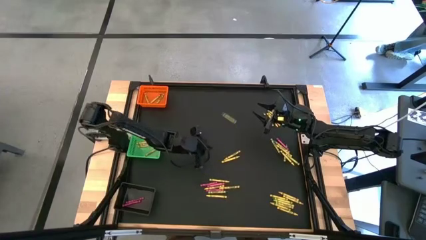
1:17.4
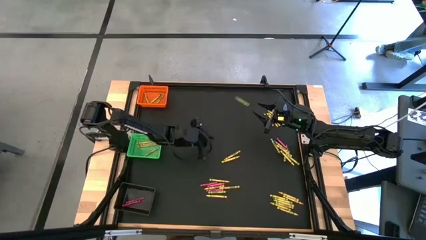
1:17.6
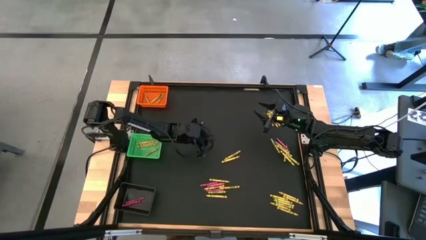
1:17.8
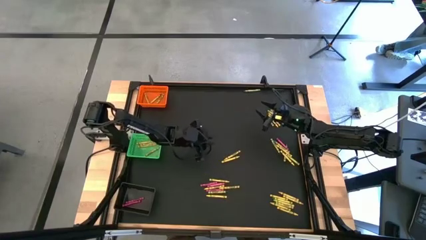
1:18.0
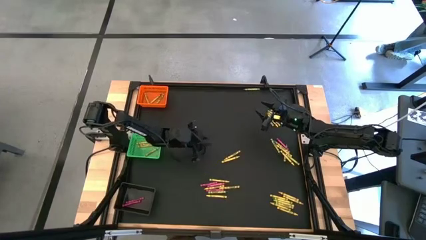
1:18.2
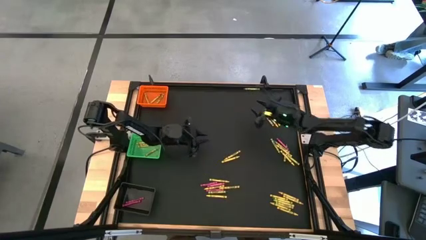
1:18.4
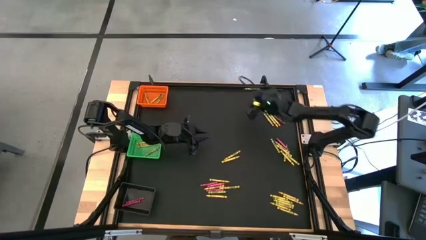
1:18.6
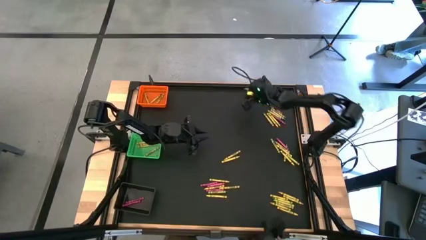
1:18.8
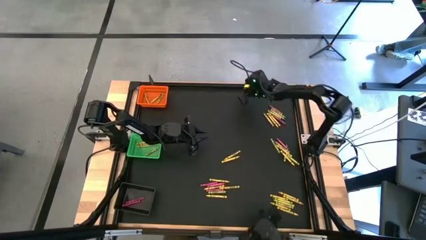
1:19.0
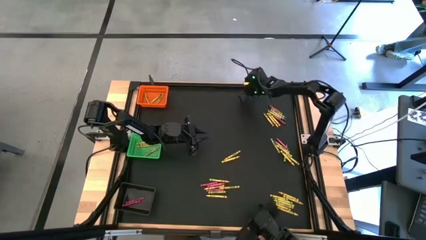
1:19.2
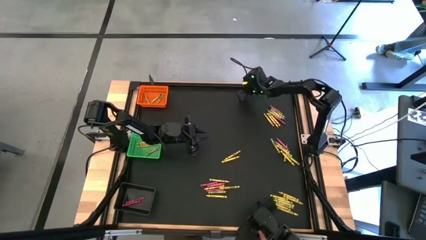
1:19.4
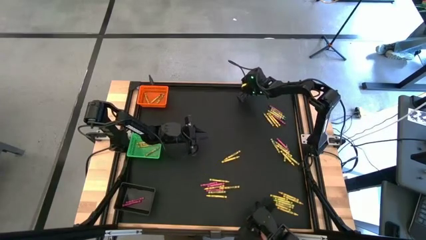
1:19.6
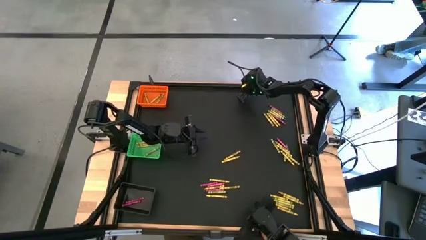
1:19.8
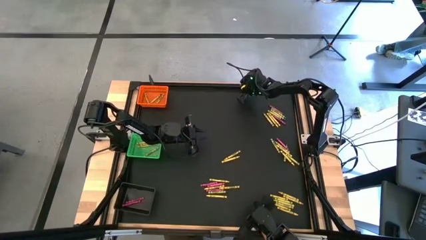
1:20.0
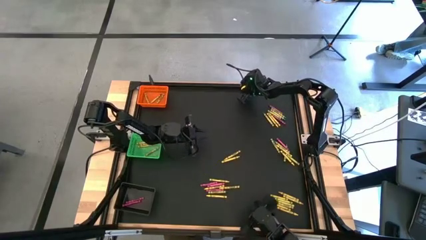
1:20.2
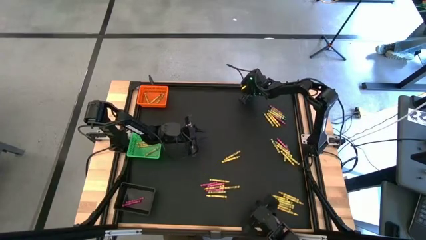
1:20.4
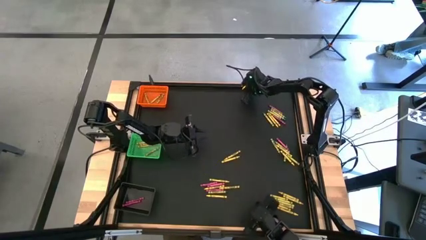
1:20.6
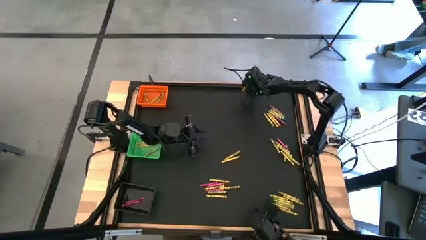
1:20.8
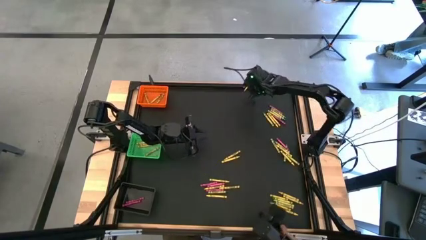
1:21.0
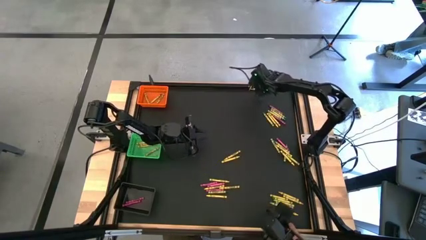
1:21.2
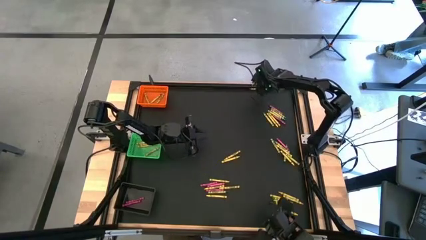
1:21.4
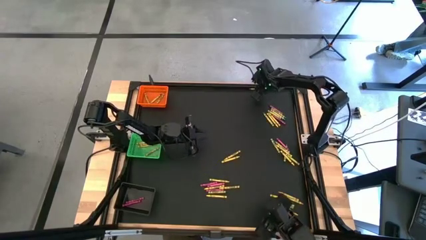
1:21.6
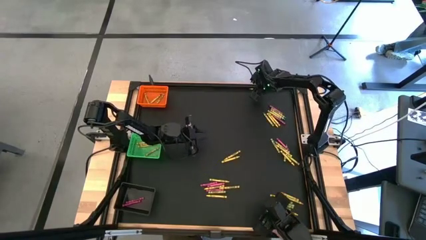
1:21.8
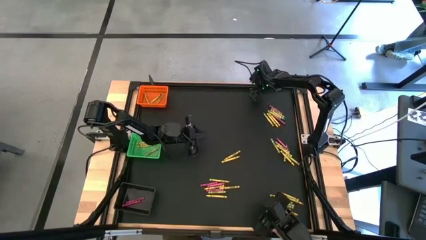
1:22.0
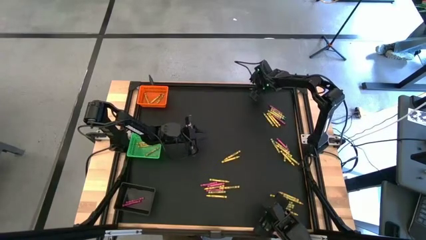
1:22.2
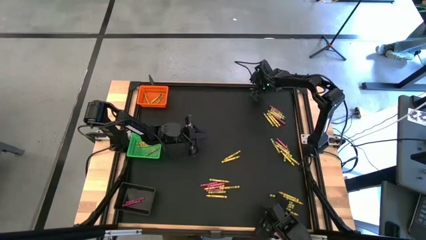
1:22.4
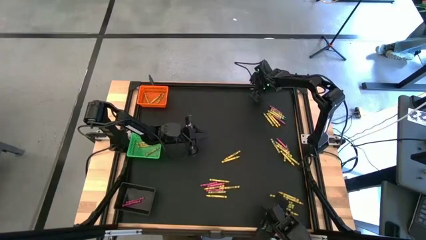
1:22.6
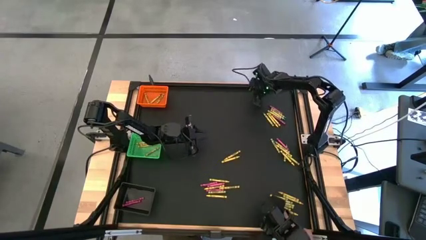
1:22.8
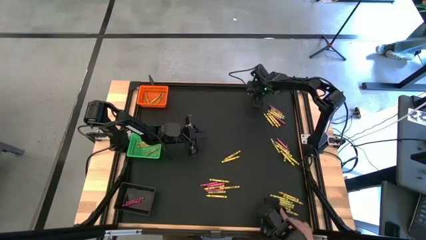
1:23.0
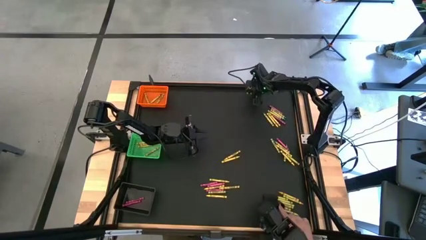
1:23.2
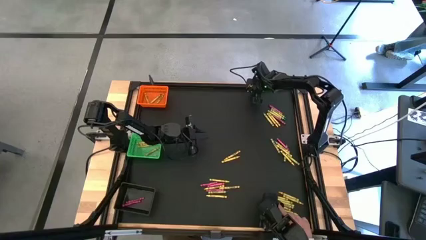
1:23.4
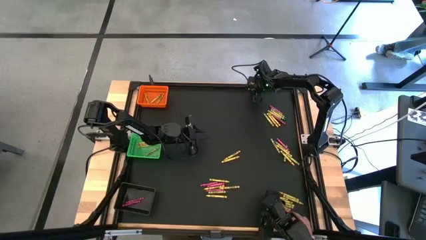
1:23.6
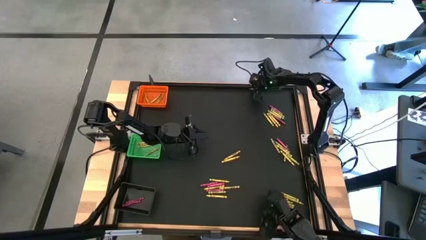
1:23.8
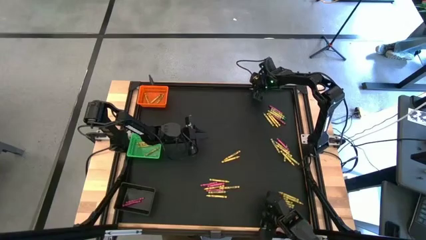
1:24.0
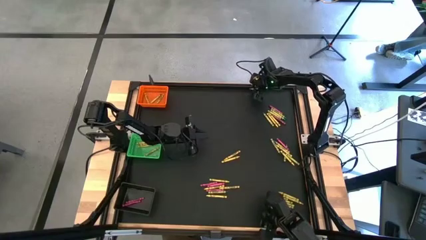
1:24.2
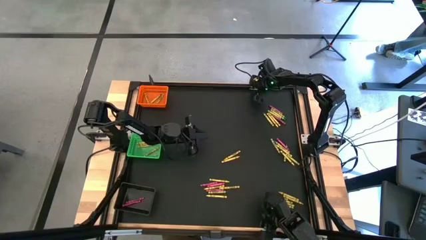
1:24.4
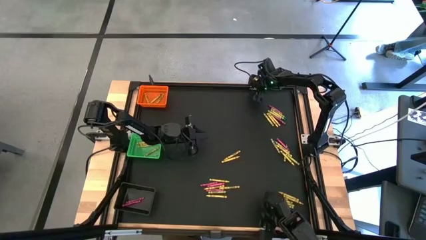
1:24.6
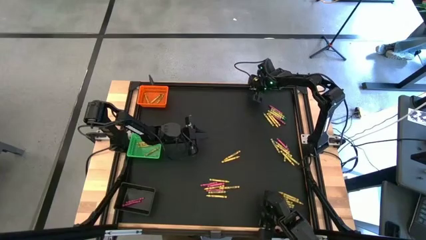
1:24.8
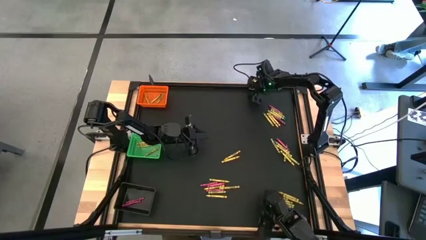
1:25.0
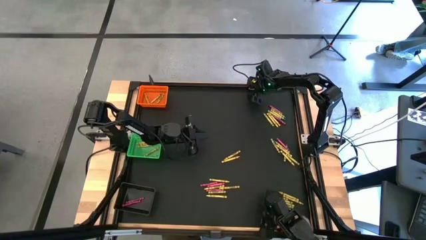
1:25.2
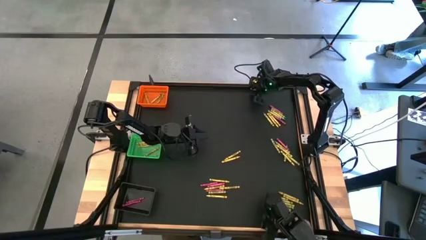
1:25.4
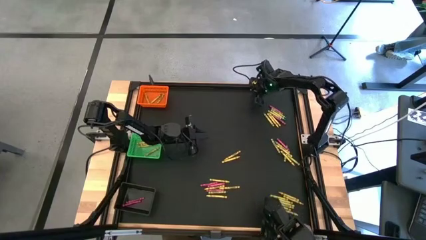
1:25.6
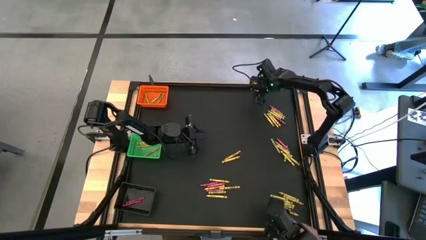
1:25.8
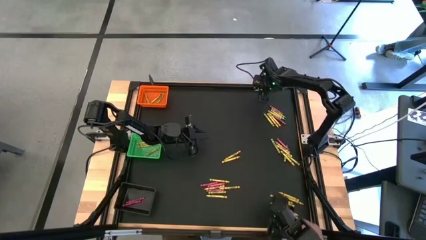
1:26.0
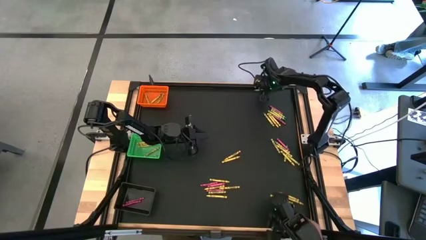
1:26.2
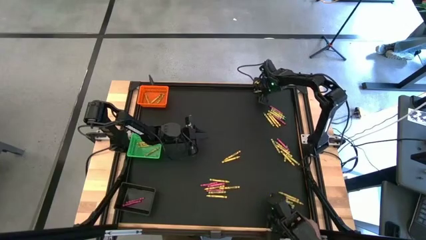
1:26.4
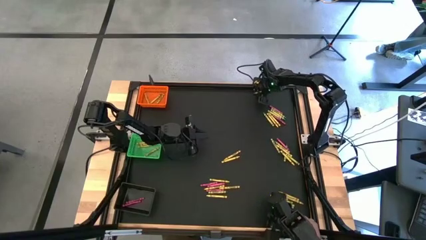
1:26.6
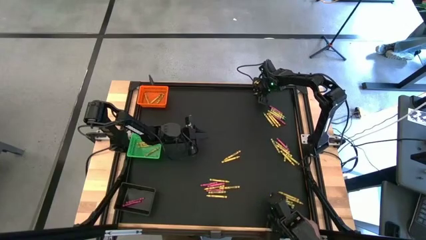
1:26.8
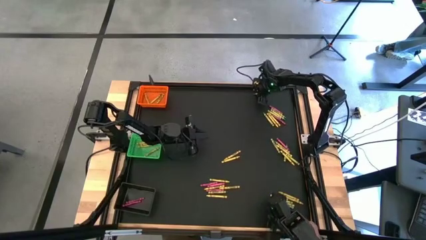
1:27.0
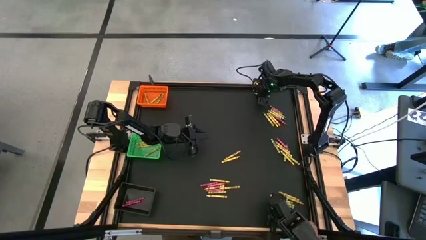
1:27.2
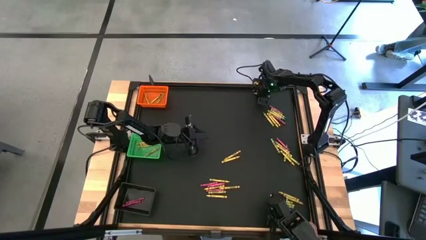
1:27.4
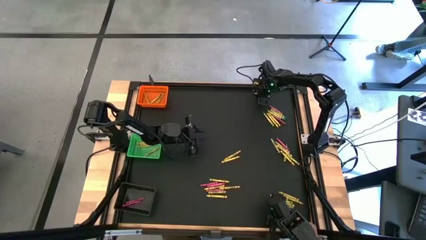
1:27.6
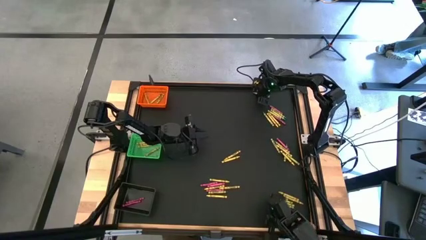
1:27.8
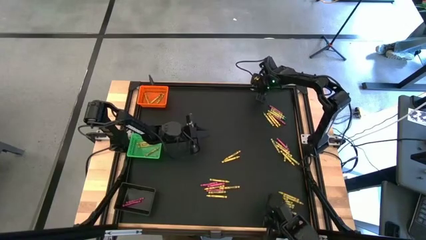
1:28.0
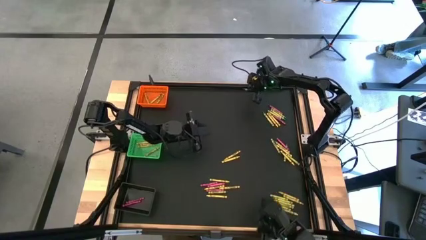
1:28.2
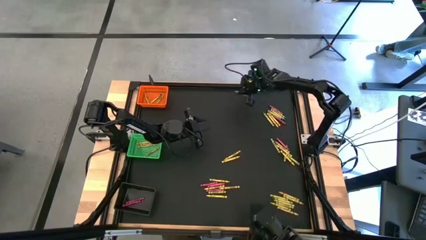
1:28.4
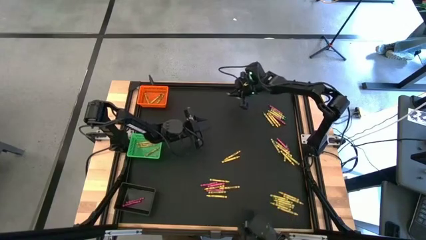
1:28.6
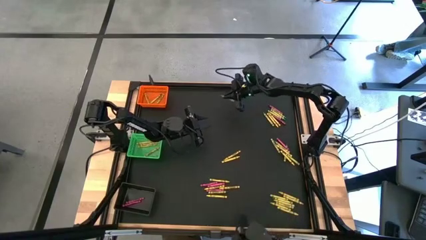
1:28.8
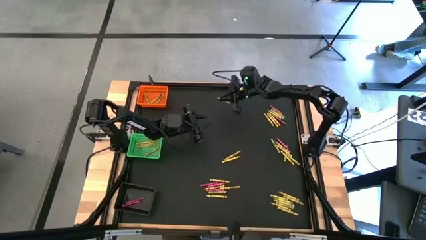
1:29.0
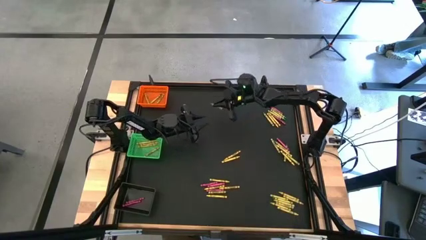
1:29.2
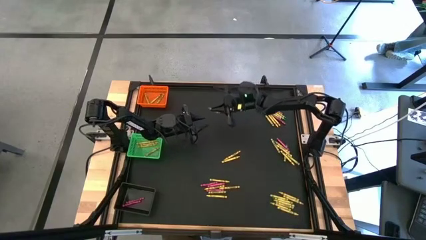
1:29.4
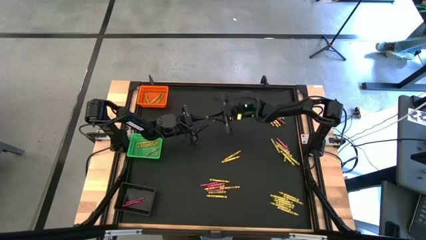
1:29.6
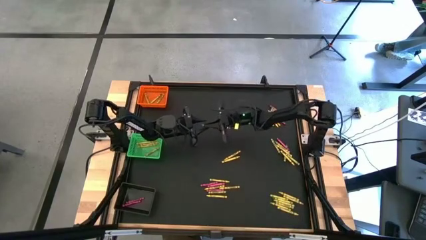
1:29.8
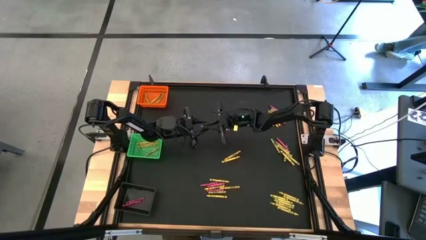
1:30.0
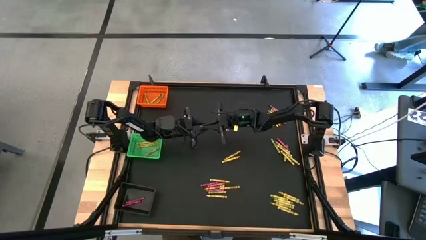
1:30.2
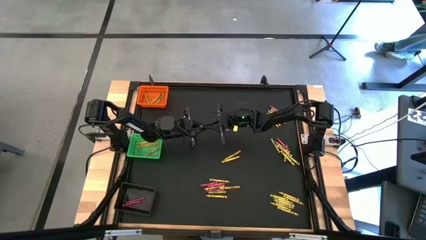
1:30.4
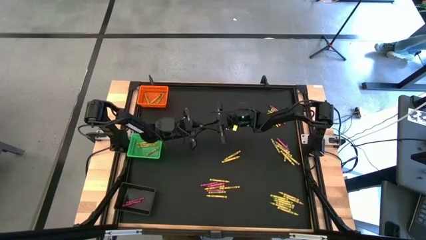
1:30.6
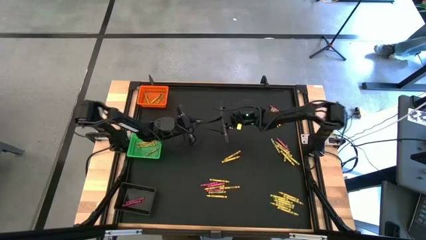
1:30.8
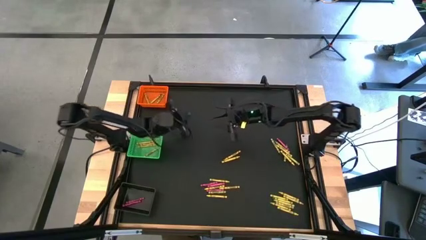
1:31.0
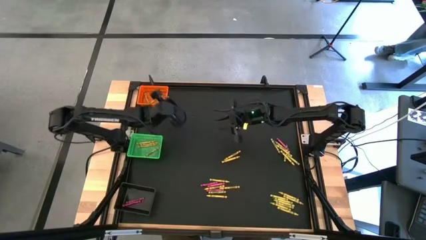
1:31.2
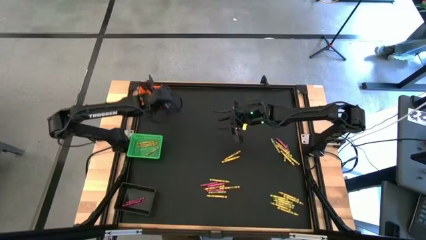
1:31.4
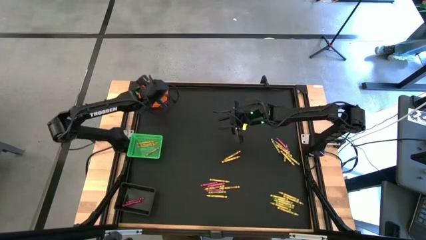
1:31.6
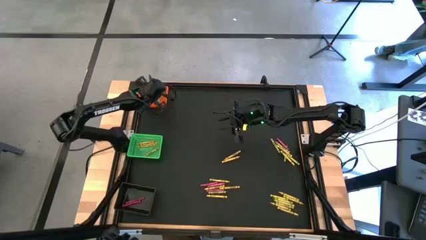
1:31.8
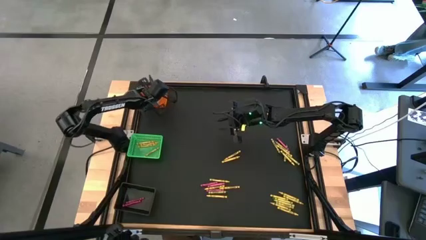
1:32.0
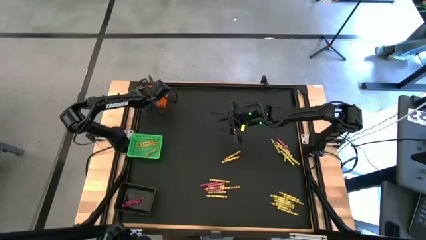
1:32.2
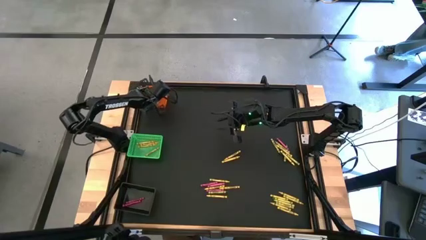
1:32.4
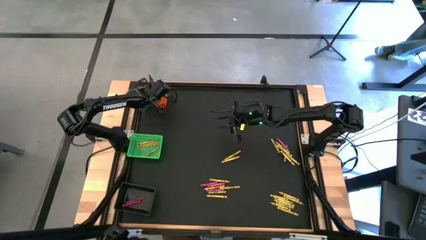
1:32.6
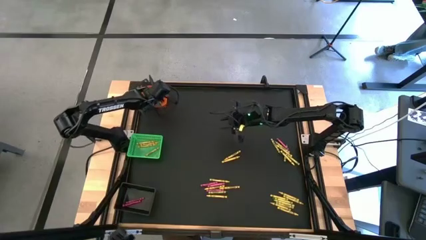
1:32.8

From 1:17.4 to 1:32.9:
Task: Sort crayons
Put the green crayon into the orange bin

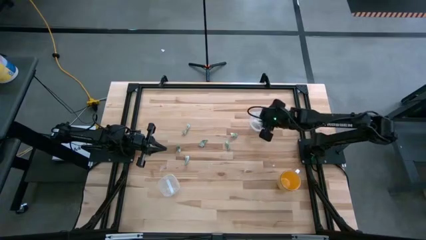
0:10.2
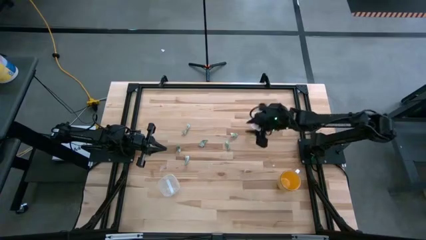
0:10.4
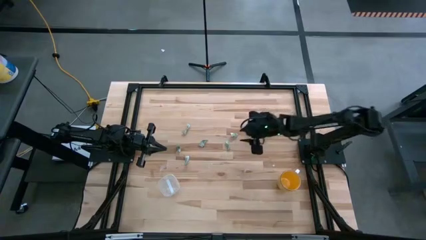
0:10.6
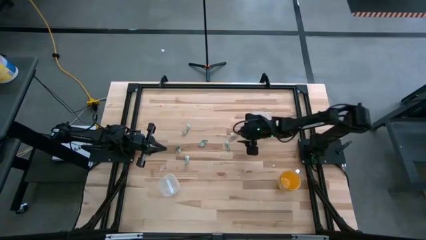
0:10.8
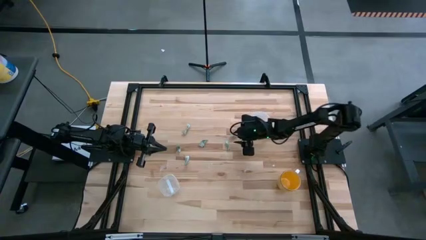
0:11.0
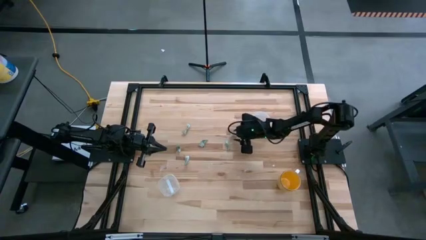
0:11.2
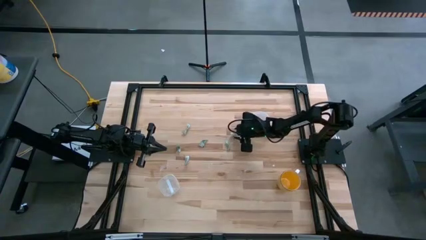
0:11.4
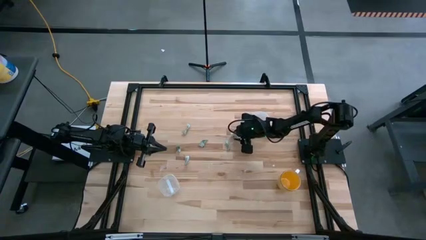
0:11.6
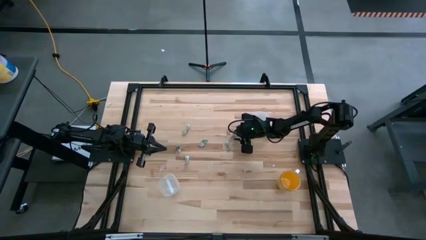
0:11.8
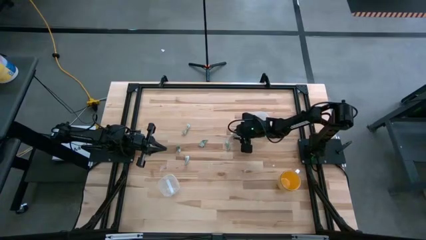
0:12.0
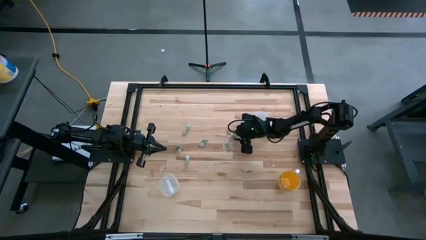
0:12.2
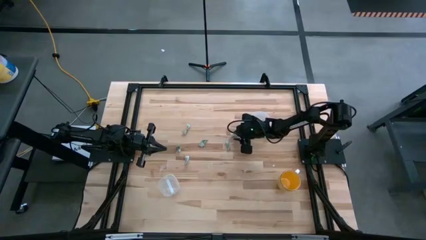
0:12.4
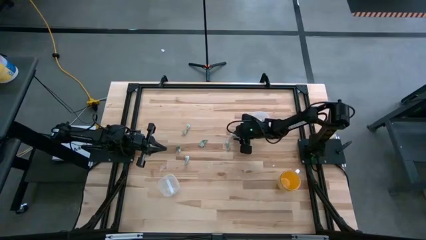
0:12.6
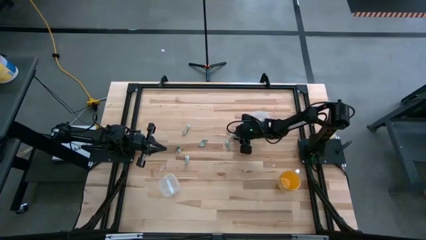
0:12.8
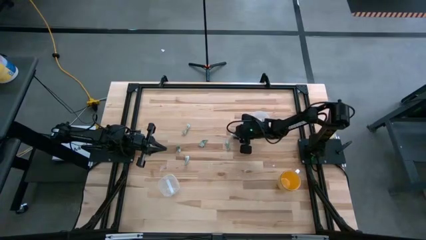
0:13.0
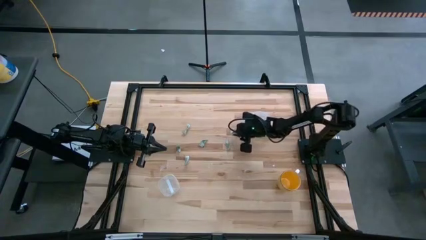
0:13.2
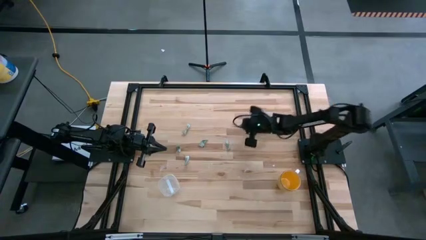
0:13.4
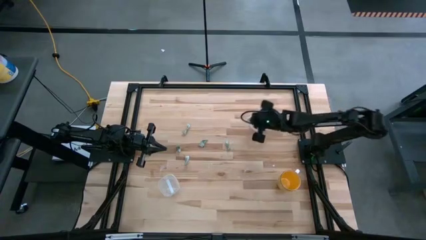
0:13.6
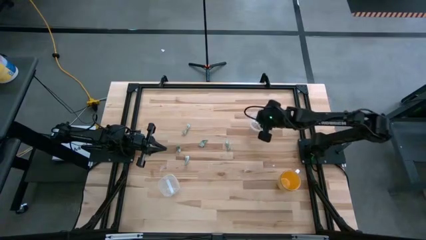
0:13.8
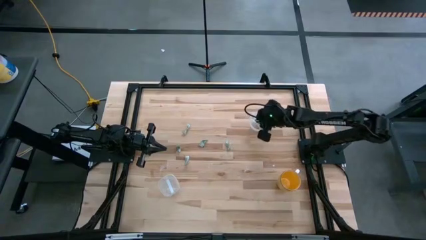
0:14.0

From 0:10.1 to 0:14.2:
Task: Pick and place Stevia / Truvia into bins
Put the stevia packet into the round transparent container
